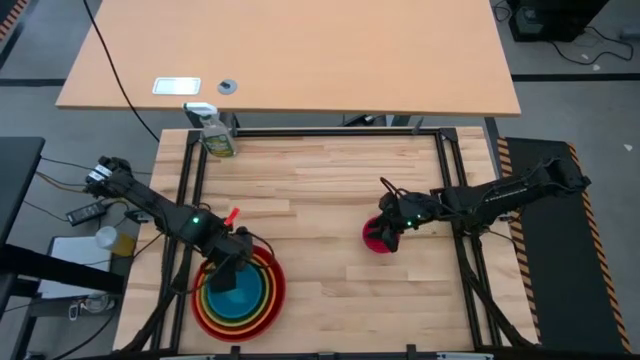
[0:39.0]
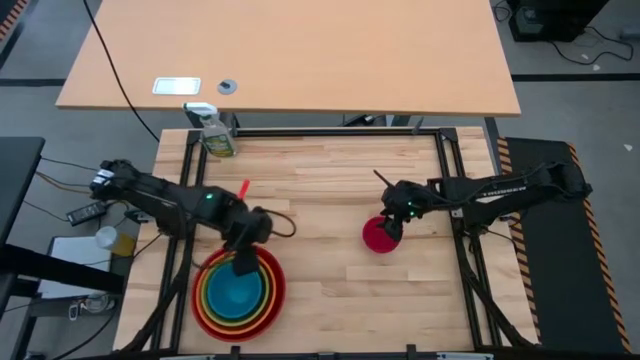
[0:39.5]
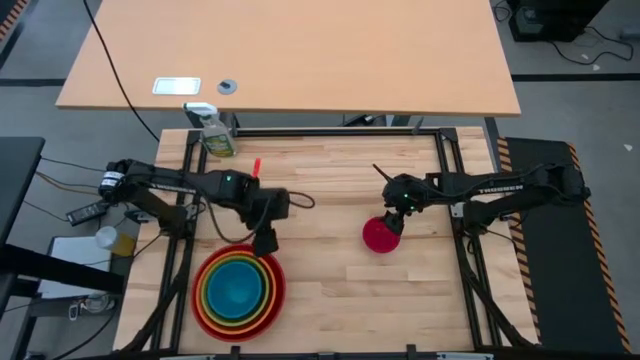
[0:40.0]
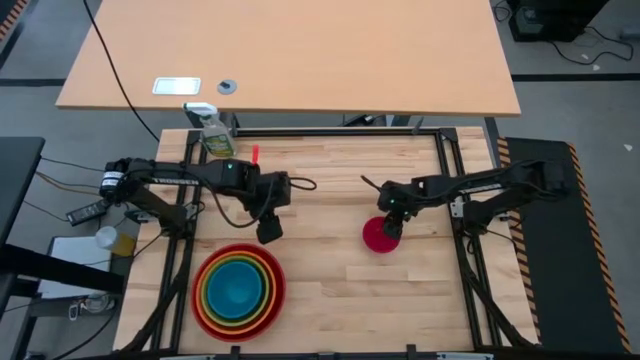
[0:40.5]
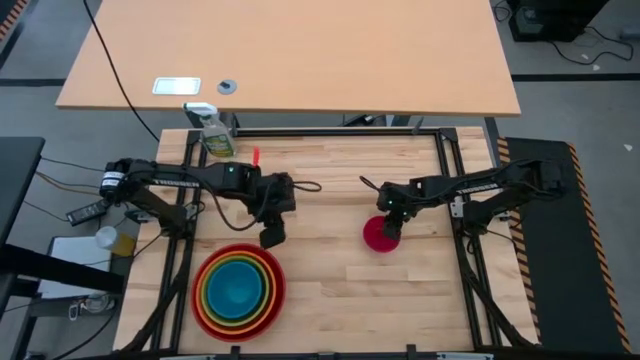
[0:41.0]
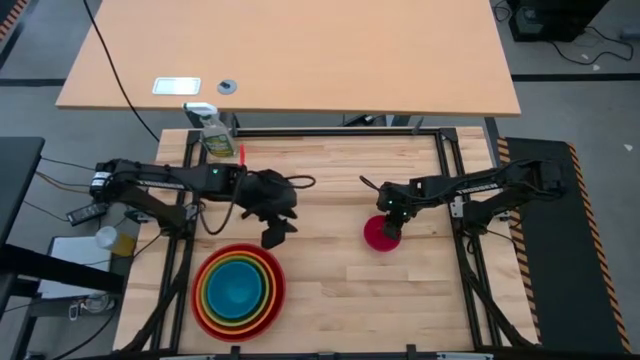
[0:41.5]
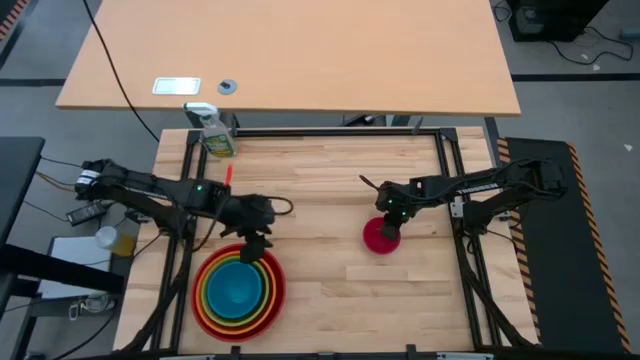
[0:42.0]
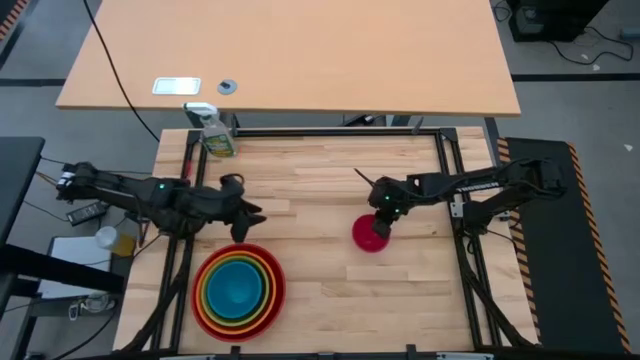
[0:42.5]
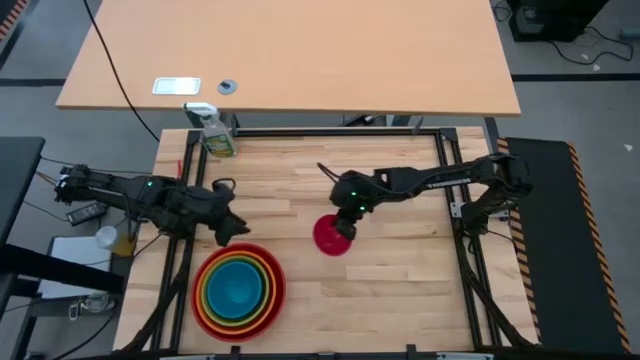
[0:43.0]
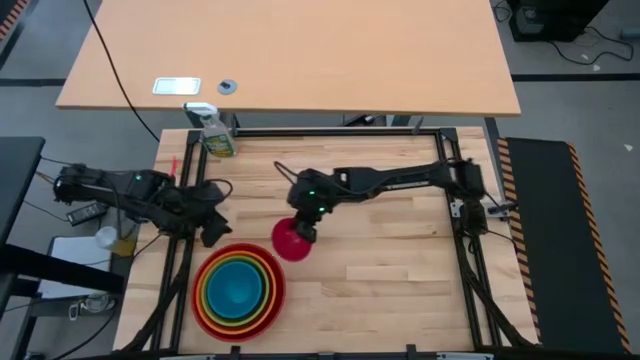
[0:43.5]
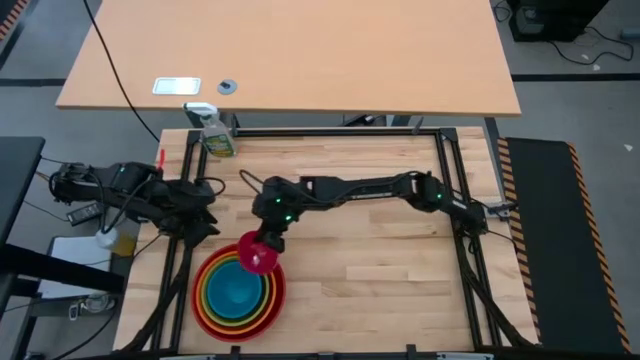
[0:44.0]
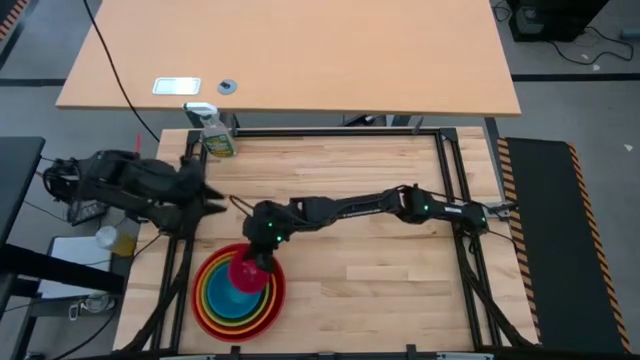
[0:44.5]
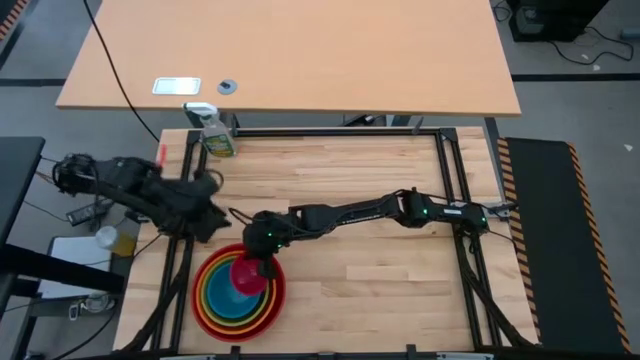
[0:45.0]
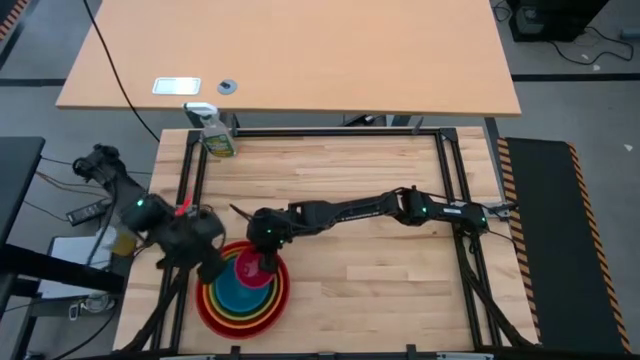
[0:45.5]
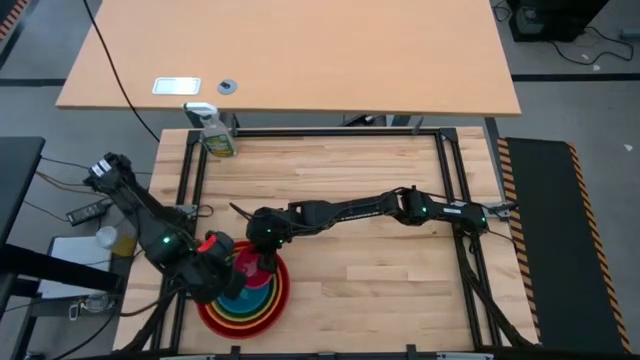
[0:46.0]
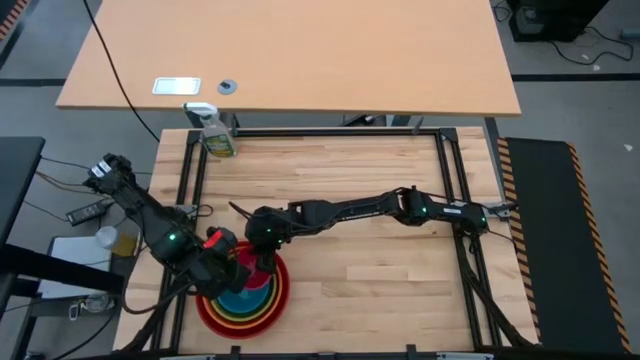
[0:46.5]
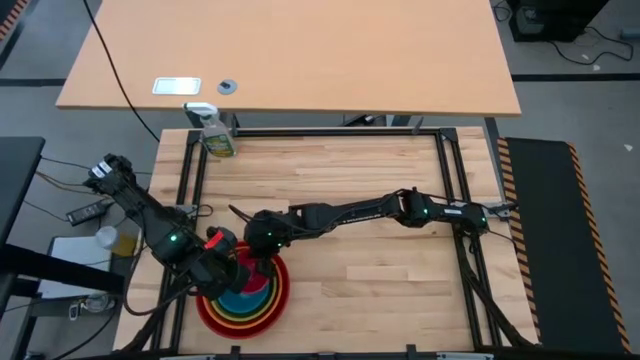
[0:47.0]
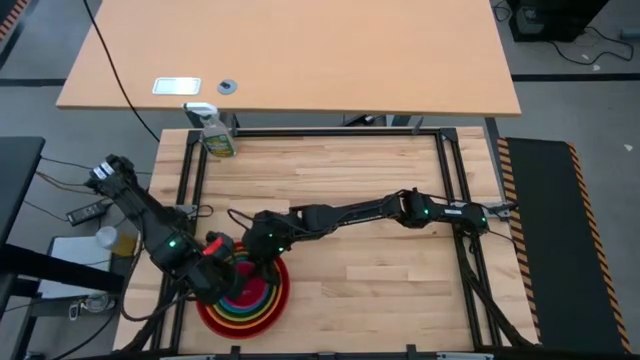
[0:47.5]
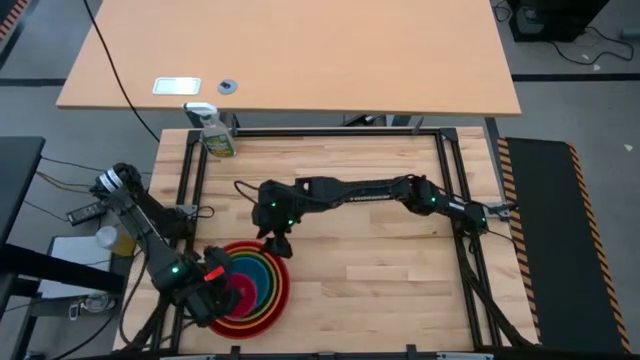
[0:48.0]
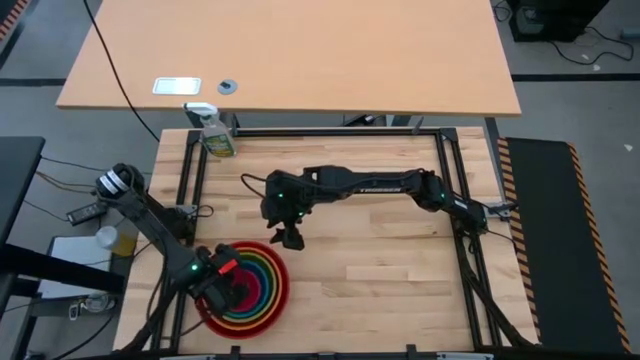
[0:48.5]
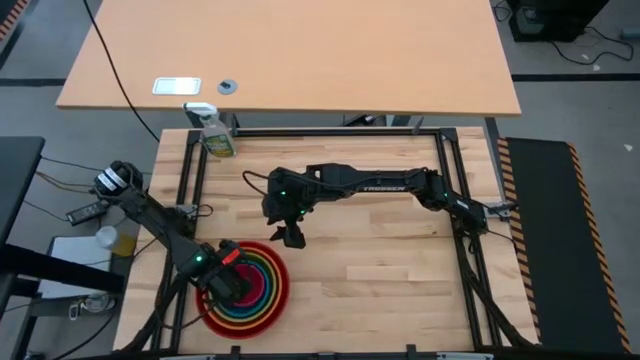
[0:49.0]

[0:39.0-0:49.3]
Stack the pink bowl on top of the blue bowl

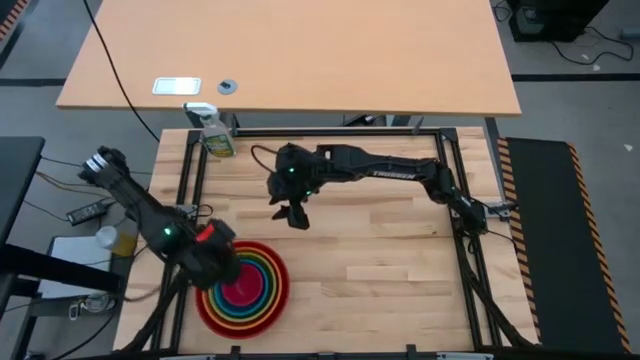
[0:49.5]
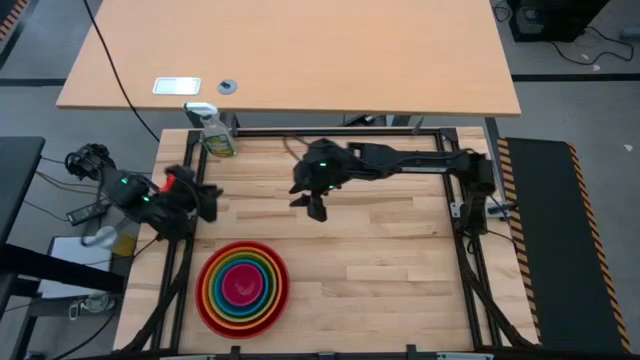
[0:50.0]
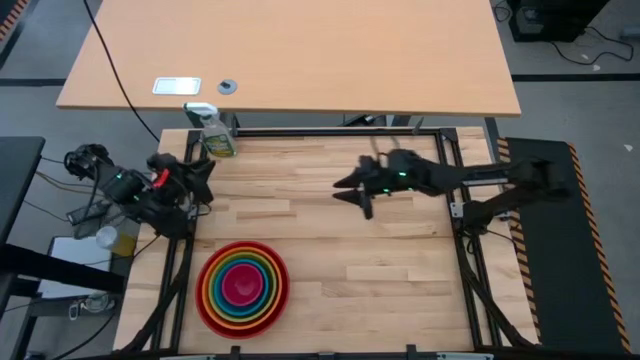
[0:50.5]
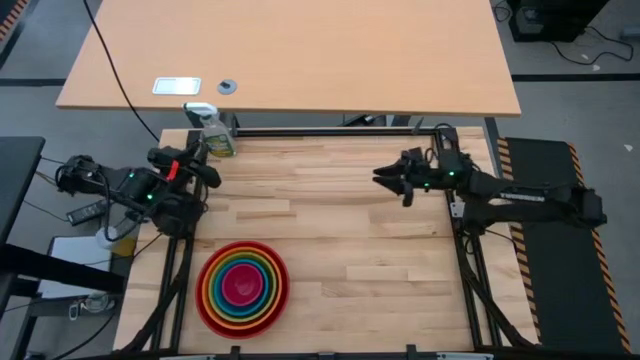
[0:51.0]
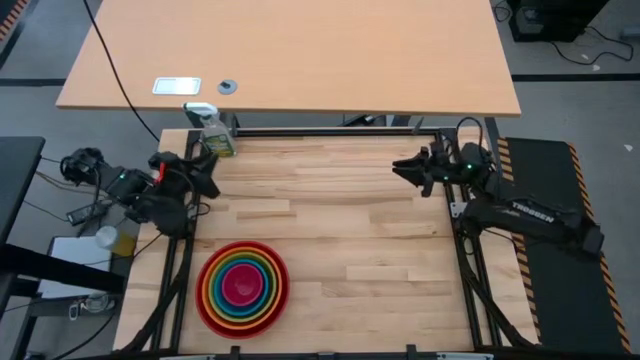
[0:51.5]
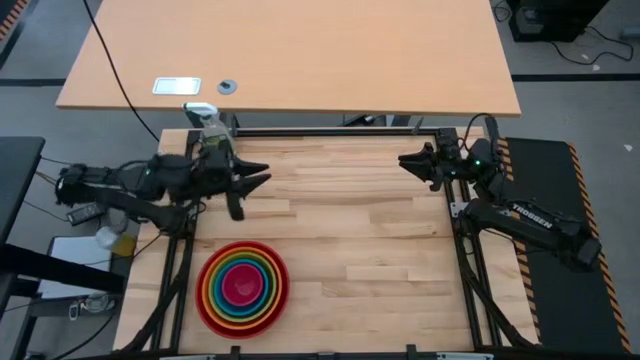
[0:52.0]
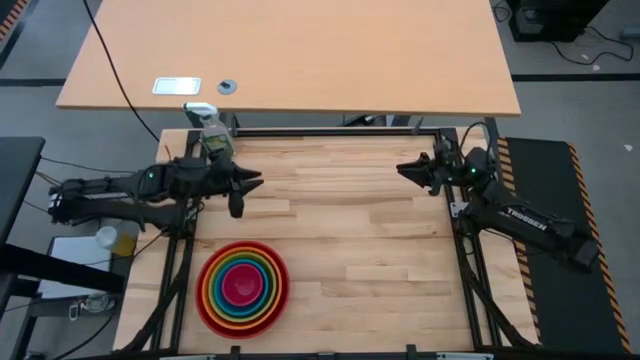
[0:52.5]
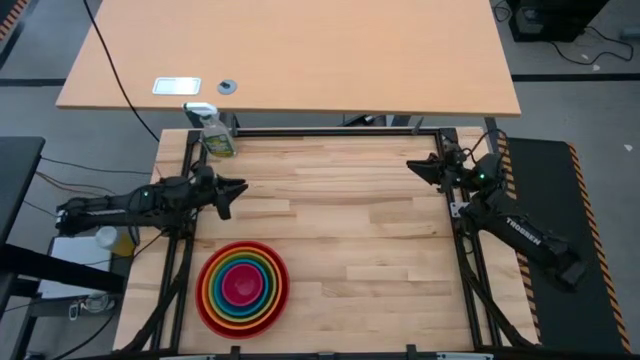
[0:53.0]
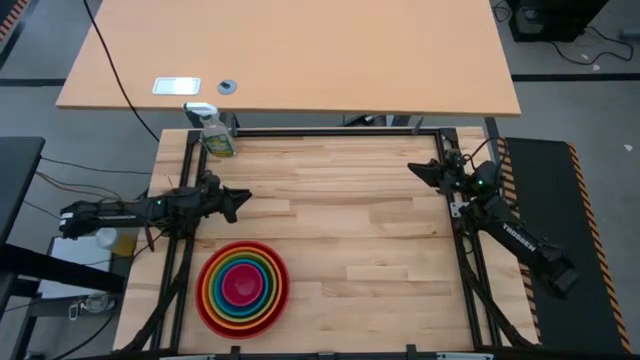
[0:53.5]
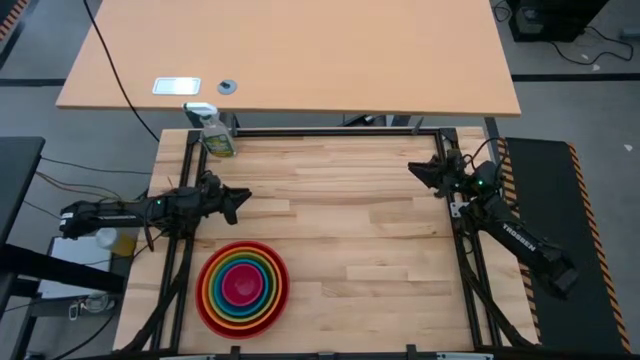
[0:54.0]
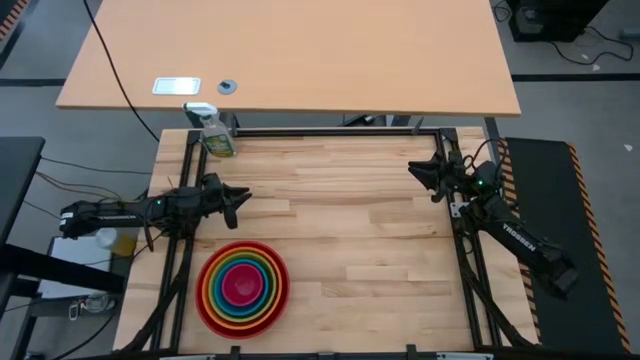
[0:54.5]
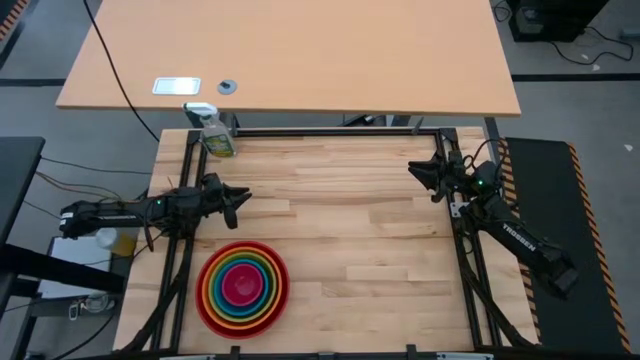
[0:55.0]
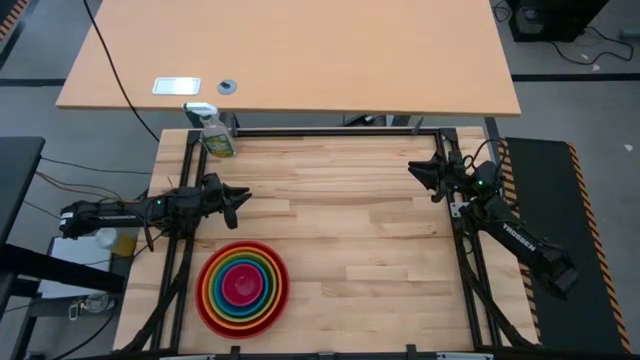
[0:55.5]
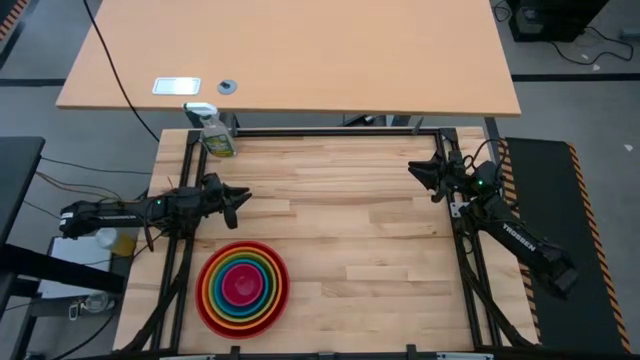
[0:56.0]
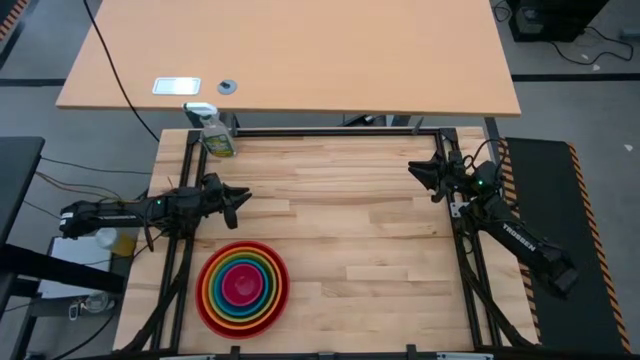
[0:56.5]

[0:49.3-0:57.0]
Return to Home Position
